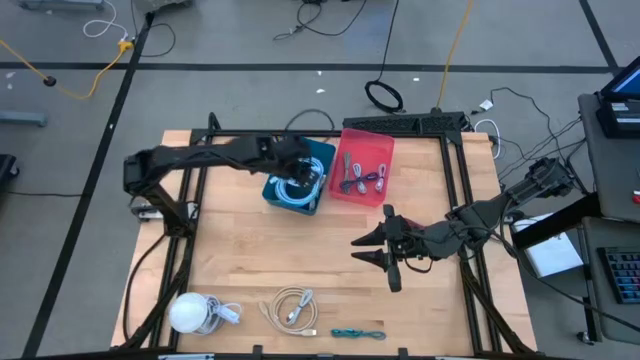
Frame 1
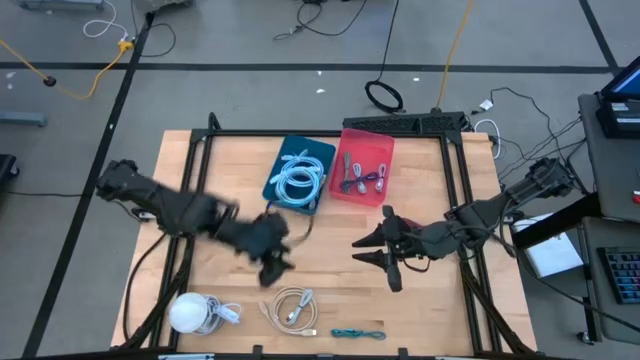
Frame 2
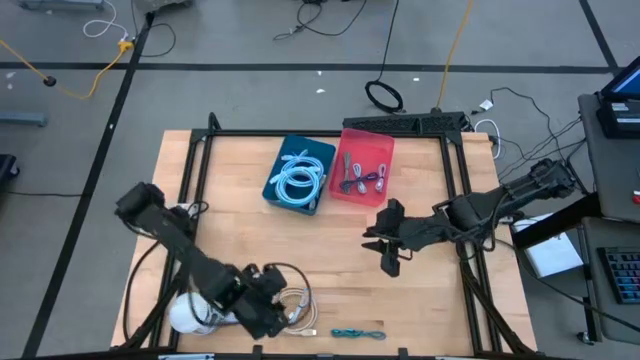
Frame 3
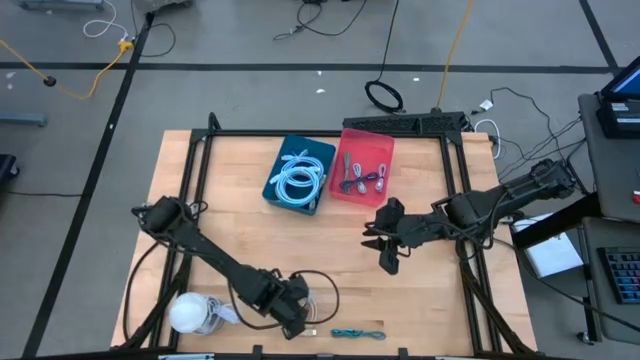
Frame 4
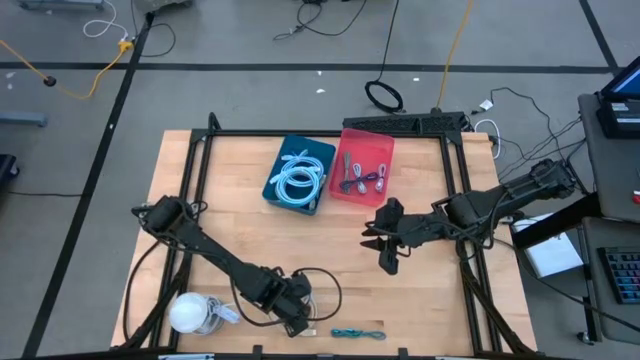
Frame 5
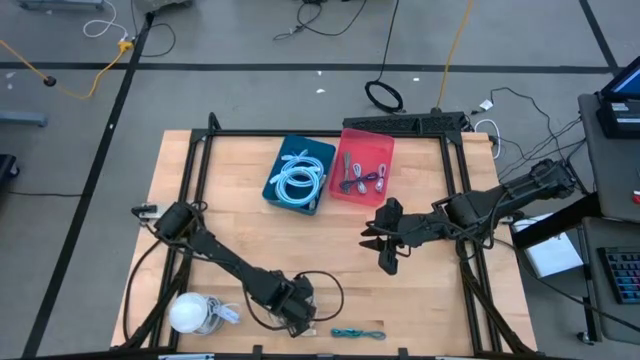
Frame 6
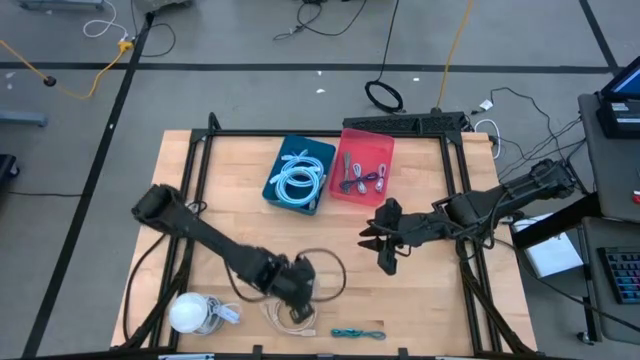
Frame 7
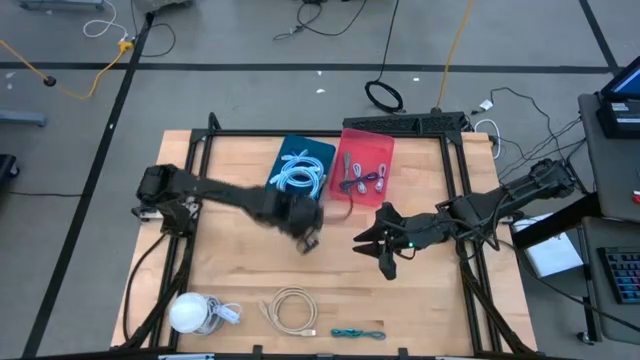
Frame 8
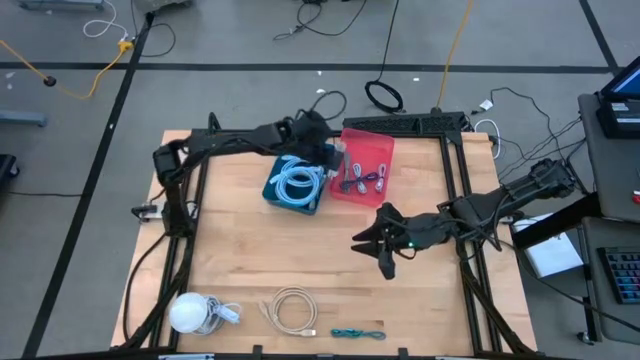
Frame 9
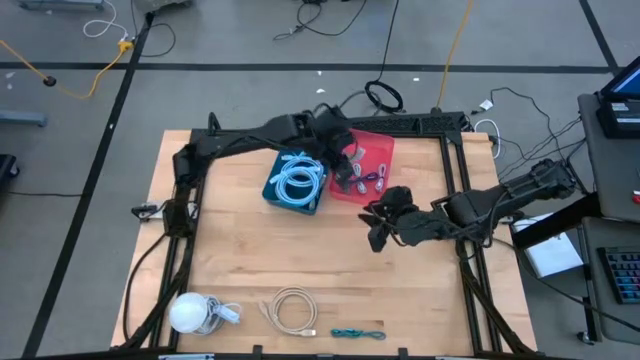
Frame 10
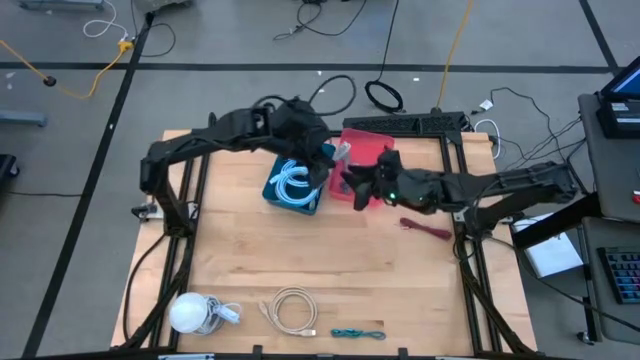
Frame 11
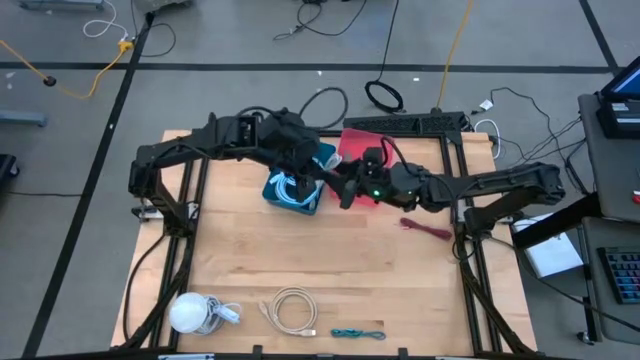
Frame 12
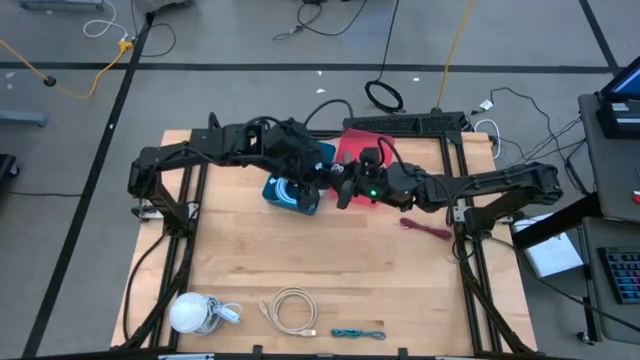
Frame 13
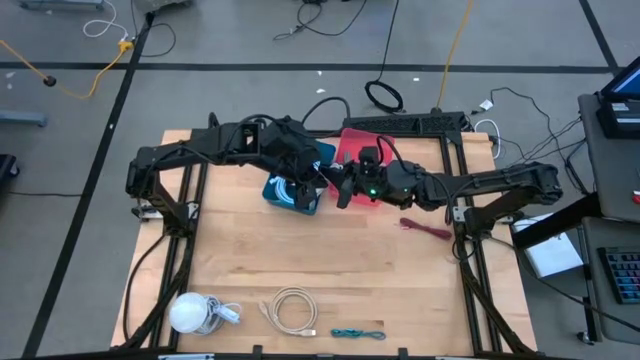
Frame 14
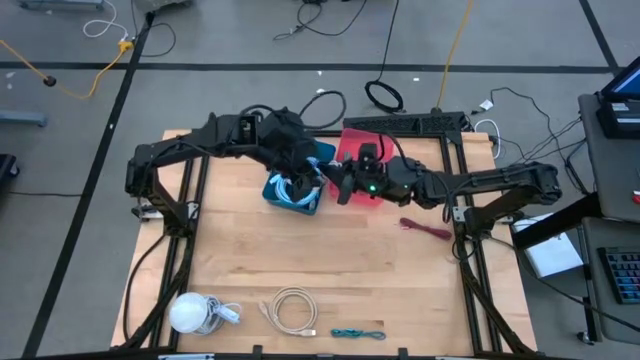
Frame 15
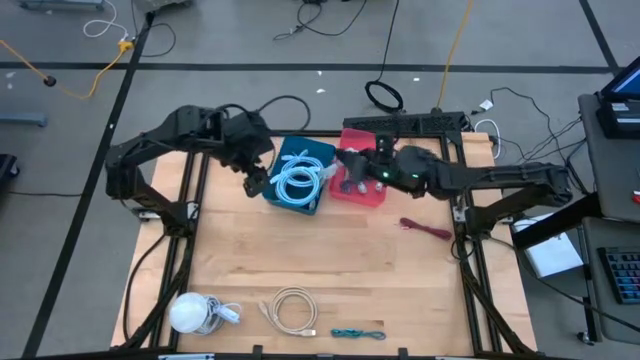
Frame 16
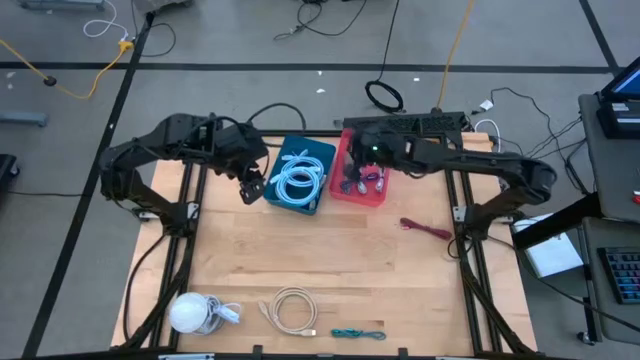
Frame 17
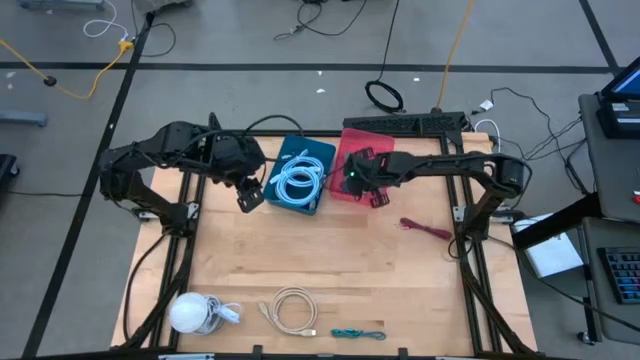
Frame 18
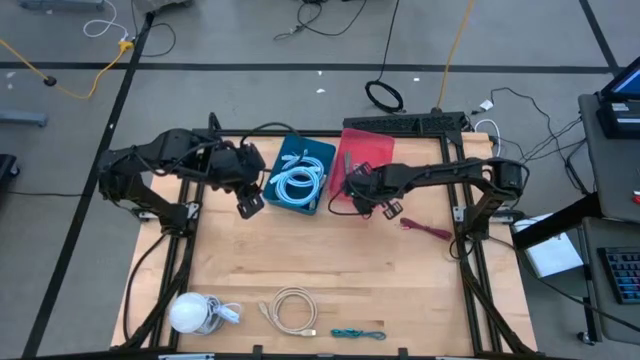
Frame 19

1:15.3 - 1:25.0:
Task: Pick & Place USB Port
Put the small white charger cable into the pink bin

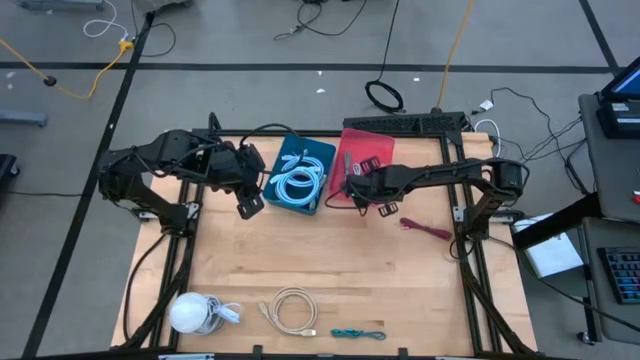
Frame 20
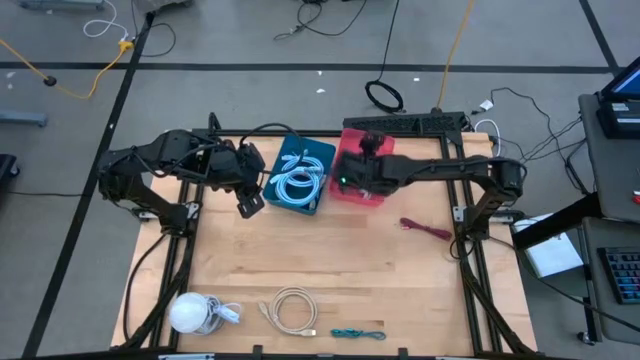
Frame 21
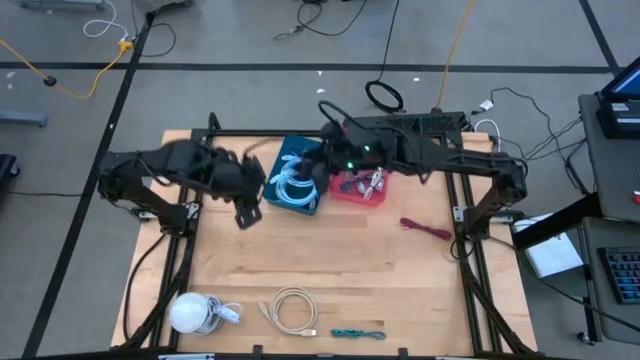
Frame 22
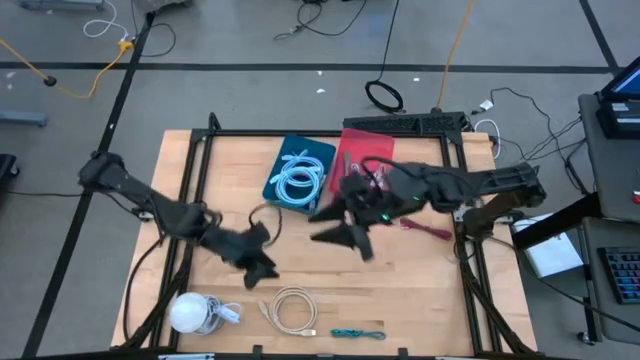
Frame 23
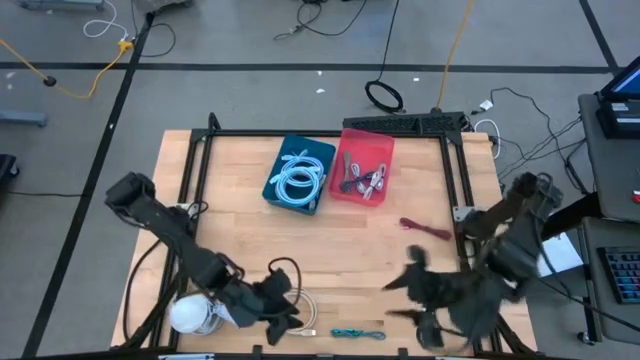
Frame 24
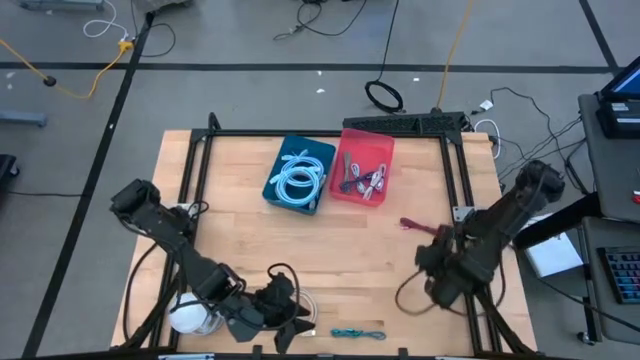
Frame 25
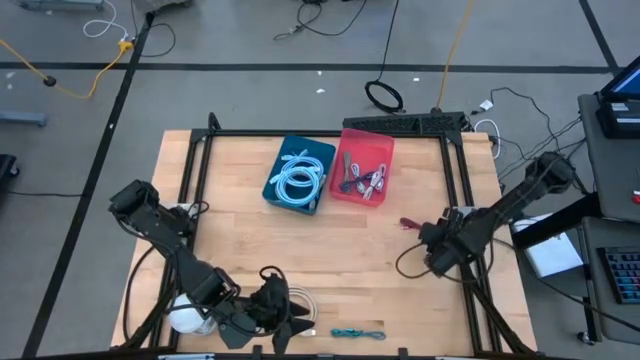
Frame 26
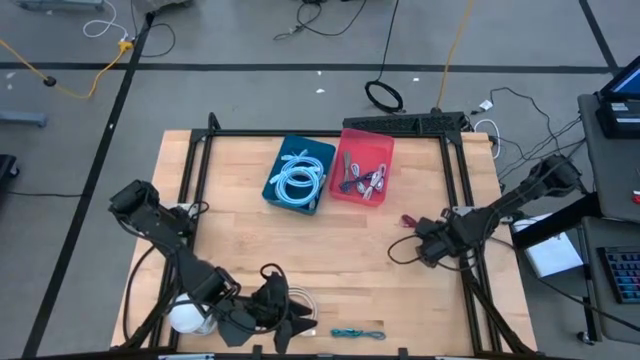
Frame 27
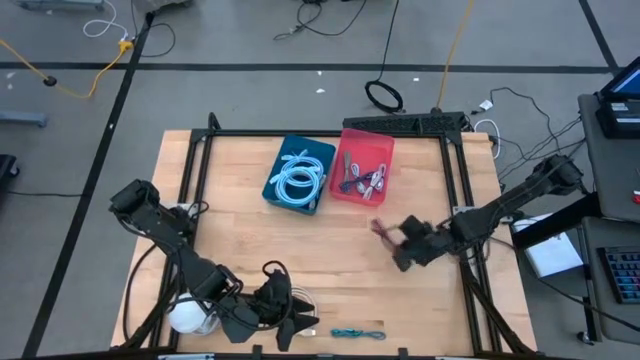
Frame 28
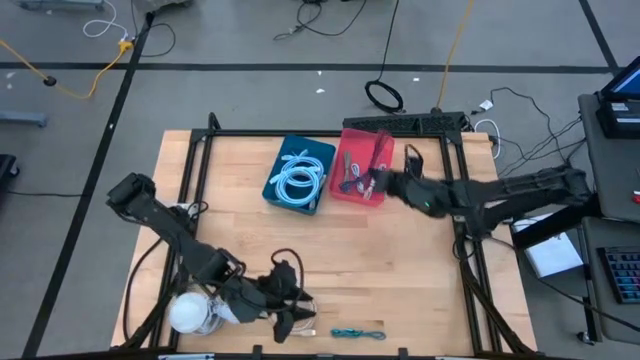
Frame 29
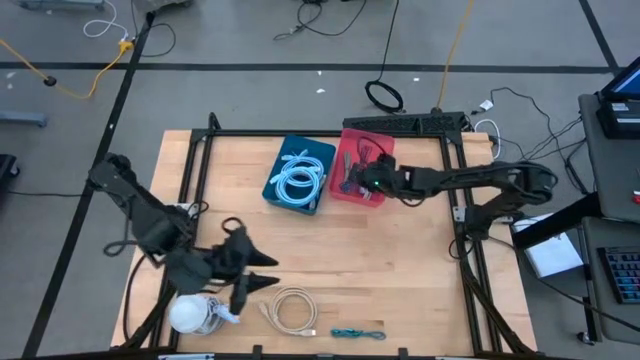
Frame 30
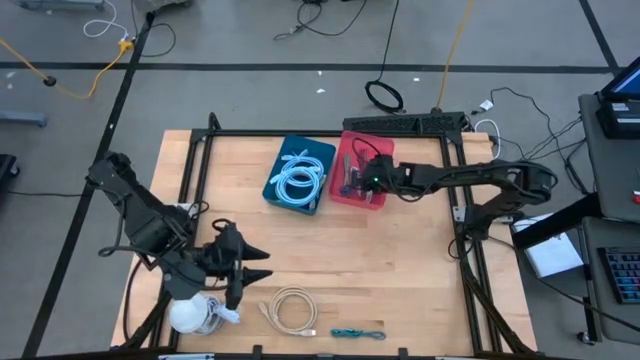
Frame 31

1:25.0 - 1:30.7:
Put the small black and pink charger cable into the pink bin

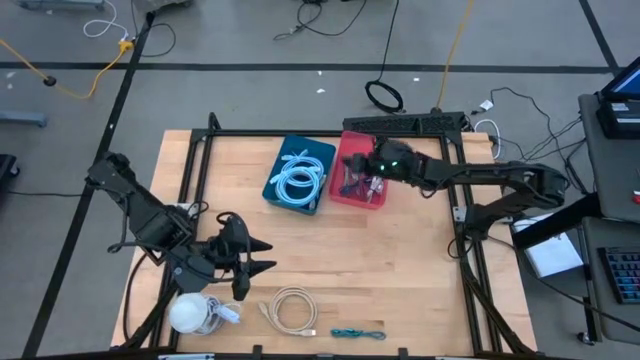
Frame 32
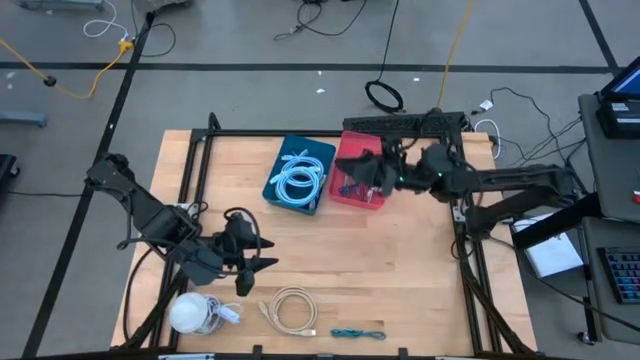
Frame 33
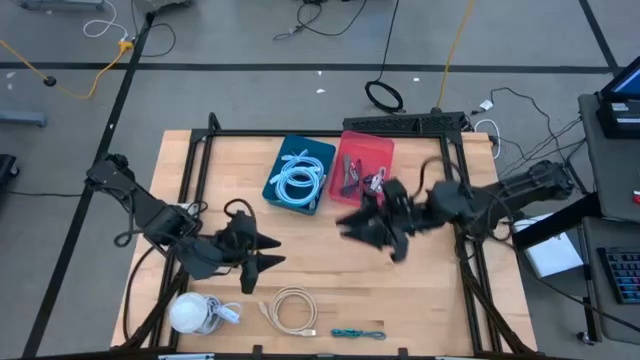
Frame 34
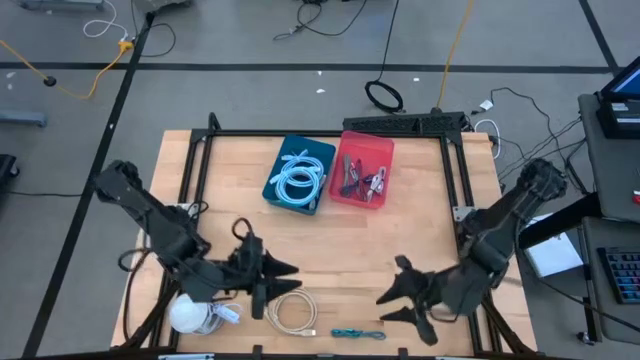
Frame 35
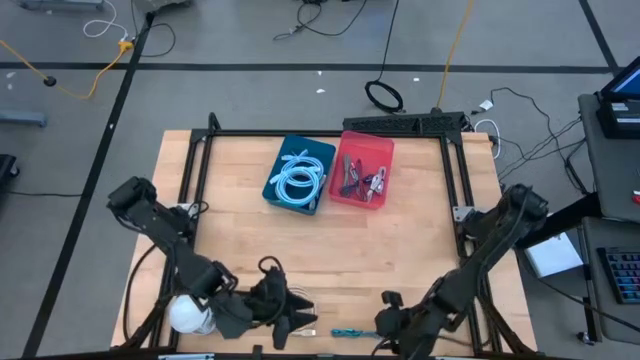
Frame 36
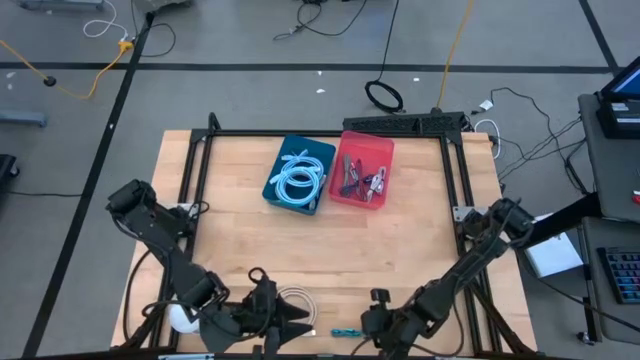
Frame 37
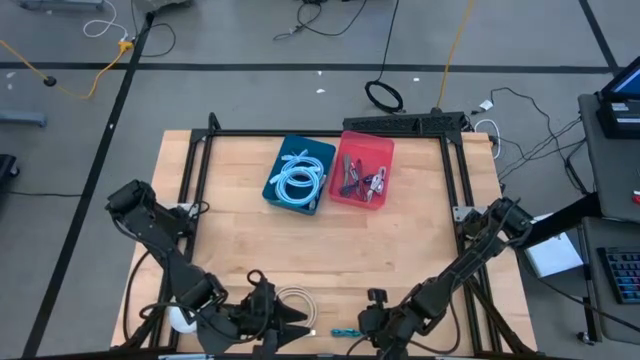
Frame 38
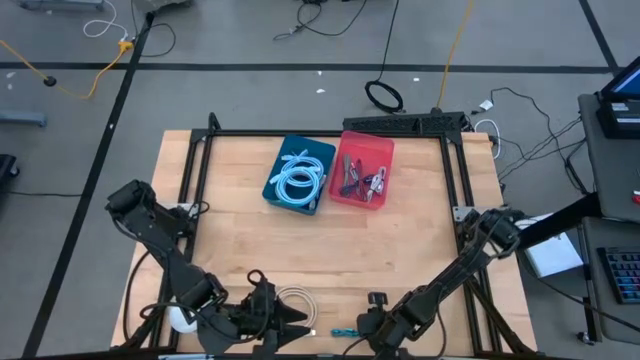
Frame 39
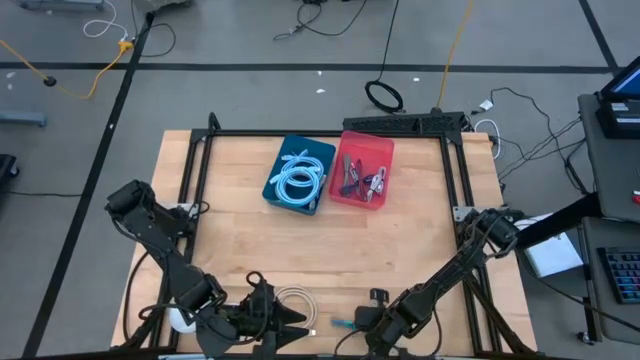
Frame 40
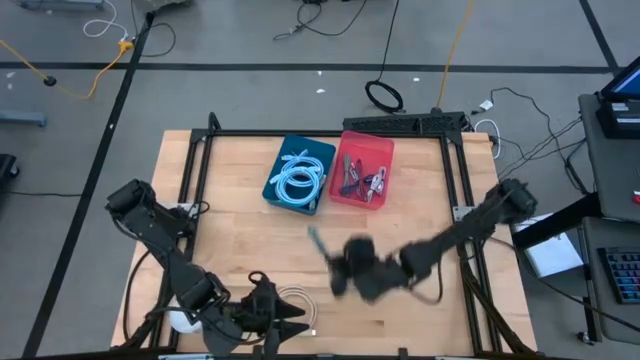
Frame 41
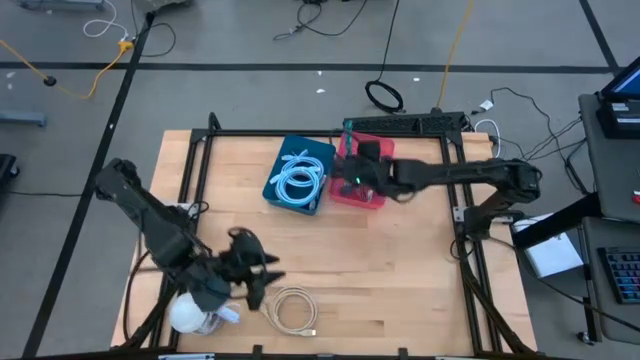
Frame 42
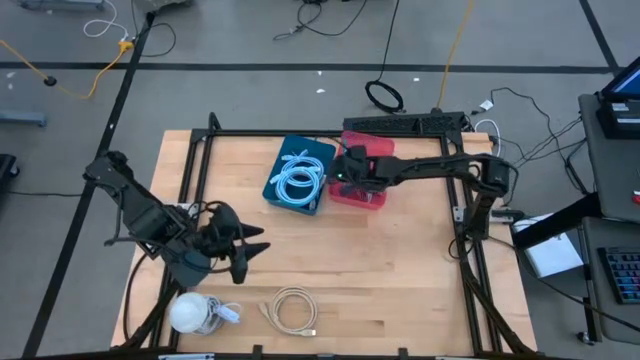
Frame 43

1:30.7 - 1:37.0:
Put the small black and blue charger cable into the pink bin
